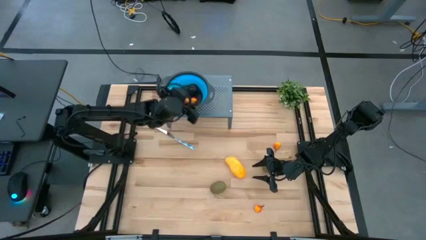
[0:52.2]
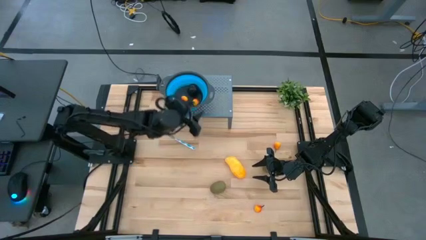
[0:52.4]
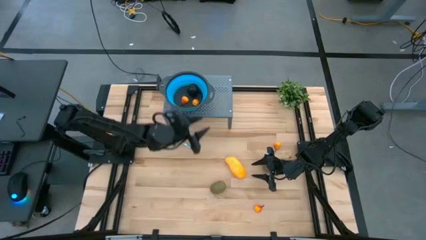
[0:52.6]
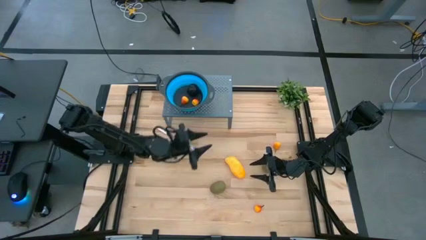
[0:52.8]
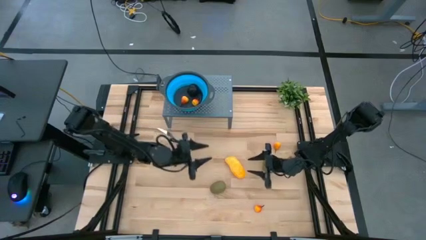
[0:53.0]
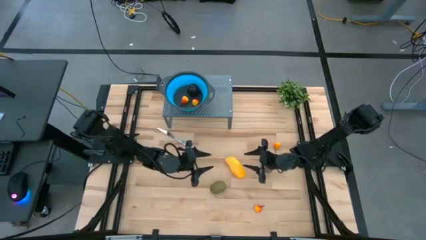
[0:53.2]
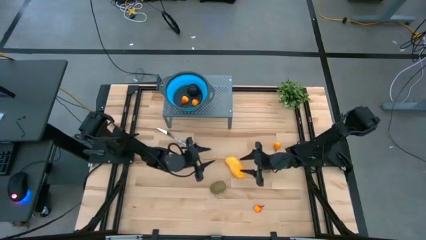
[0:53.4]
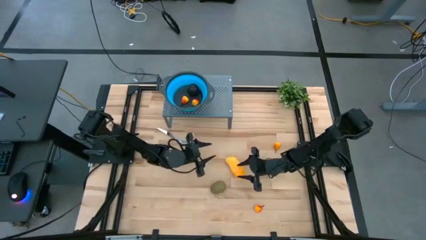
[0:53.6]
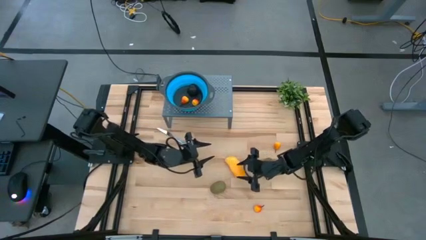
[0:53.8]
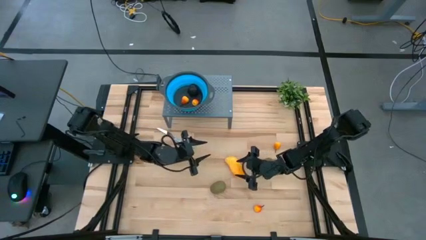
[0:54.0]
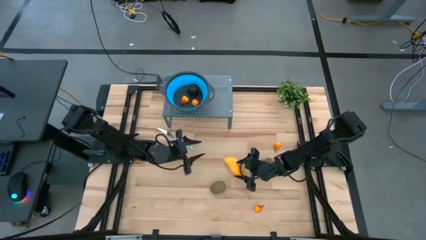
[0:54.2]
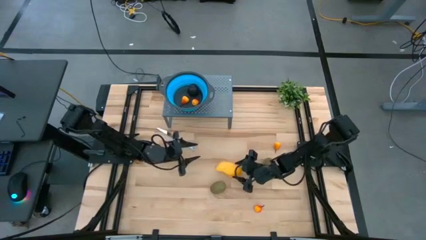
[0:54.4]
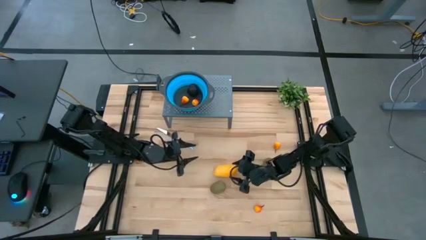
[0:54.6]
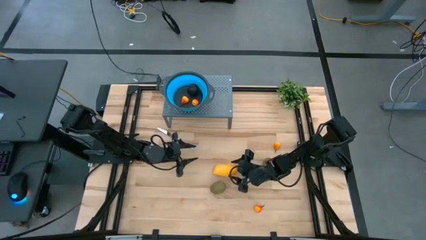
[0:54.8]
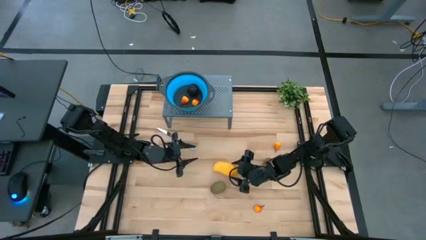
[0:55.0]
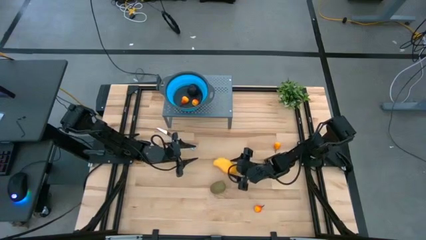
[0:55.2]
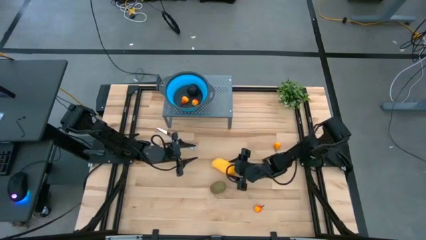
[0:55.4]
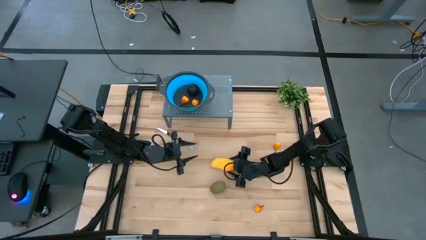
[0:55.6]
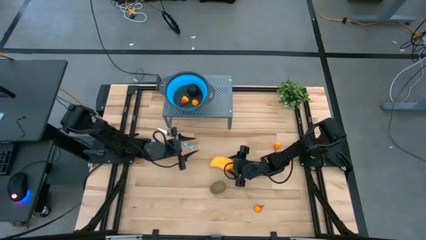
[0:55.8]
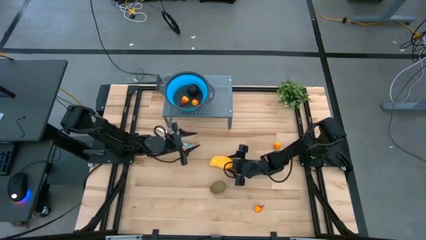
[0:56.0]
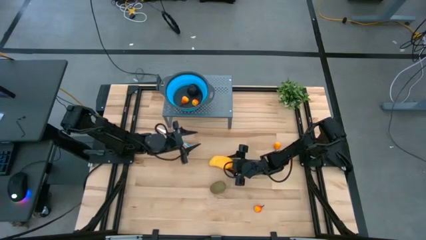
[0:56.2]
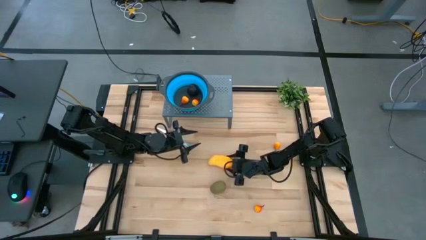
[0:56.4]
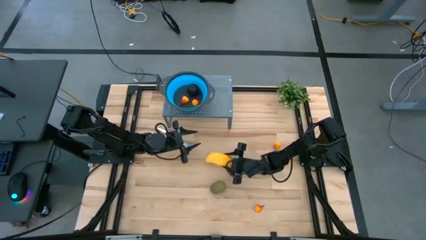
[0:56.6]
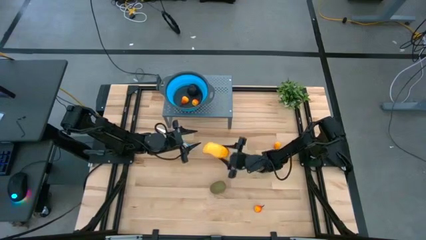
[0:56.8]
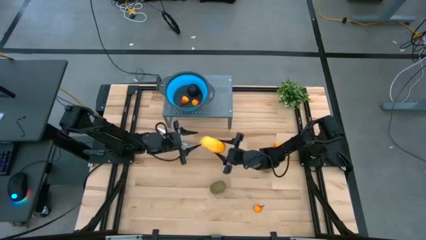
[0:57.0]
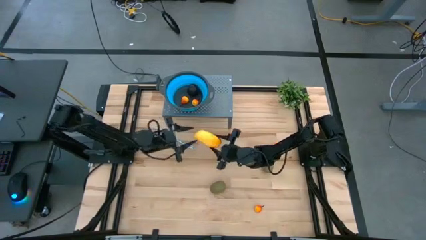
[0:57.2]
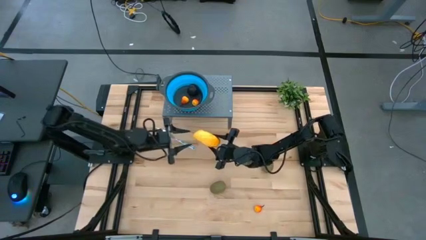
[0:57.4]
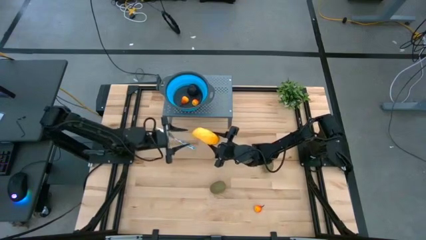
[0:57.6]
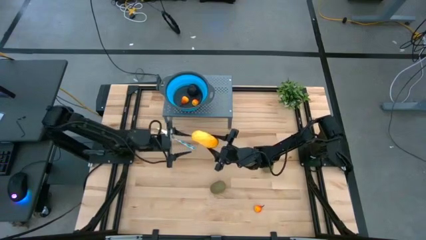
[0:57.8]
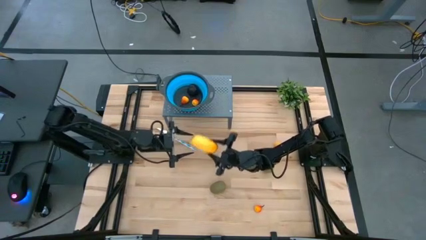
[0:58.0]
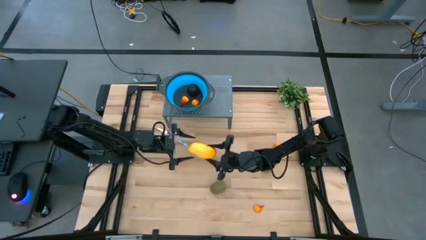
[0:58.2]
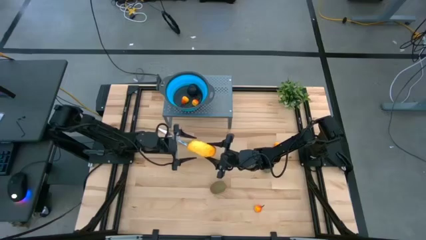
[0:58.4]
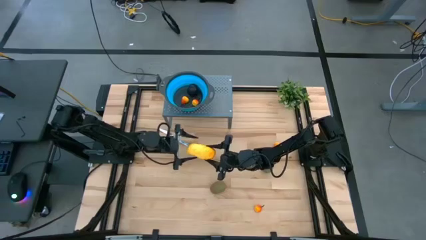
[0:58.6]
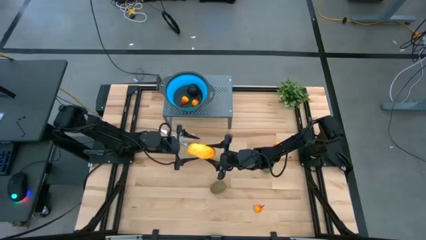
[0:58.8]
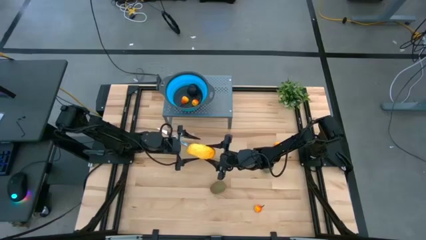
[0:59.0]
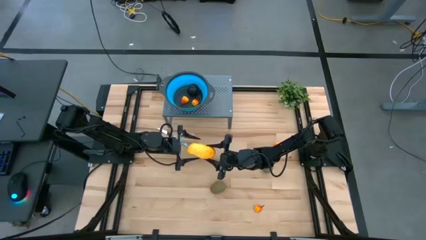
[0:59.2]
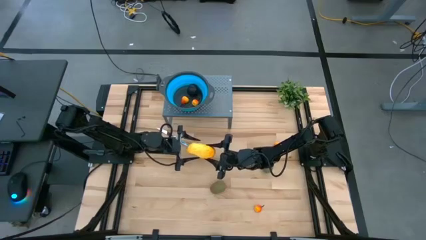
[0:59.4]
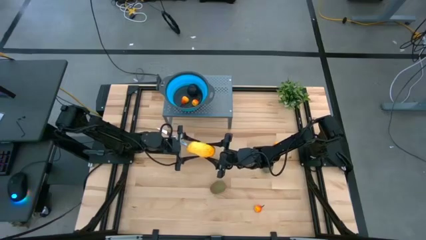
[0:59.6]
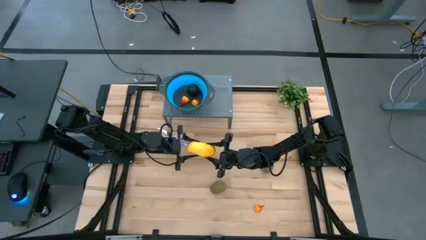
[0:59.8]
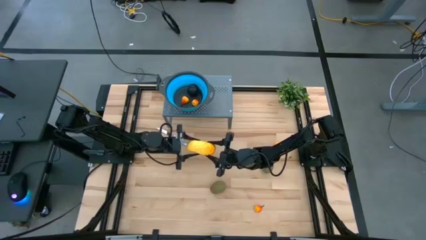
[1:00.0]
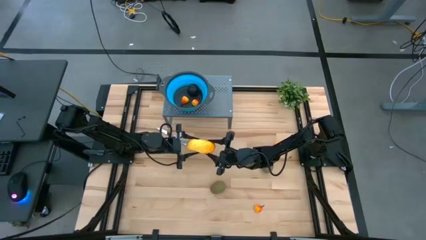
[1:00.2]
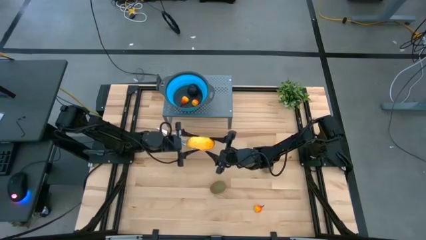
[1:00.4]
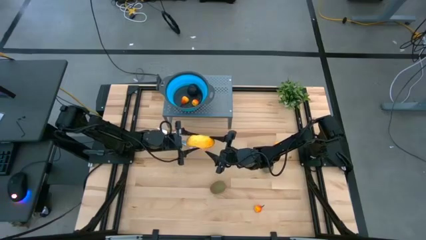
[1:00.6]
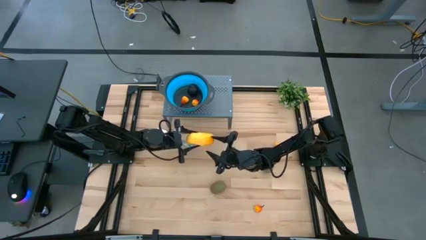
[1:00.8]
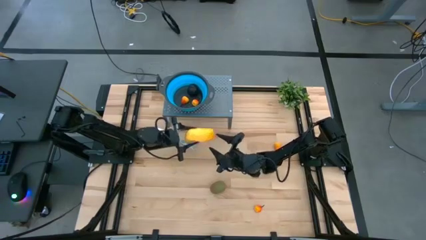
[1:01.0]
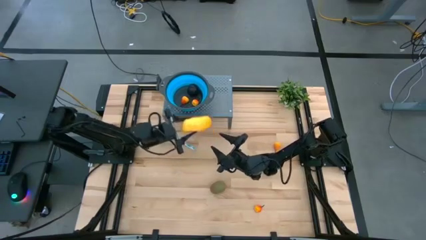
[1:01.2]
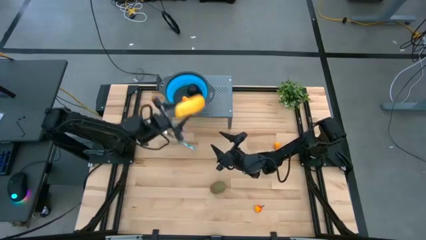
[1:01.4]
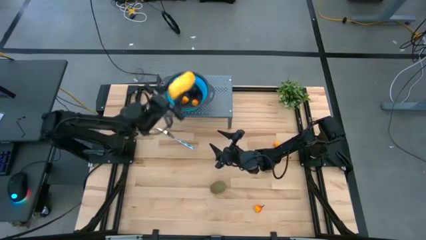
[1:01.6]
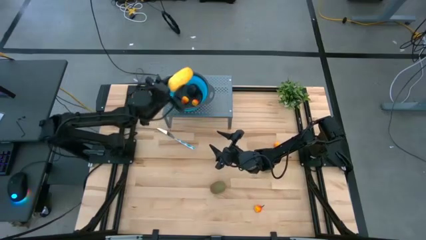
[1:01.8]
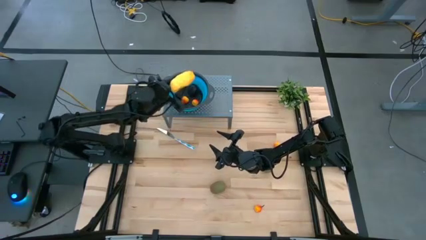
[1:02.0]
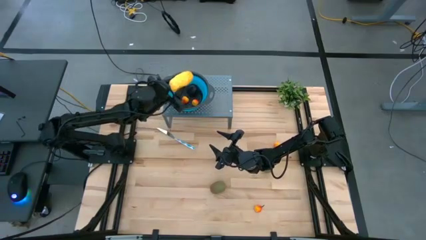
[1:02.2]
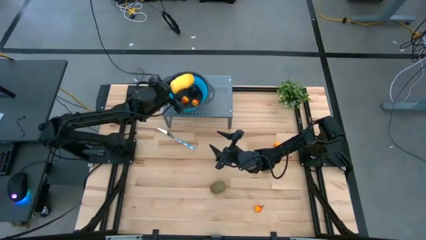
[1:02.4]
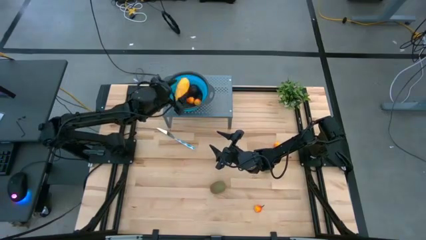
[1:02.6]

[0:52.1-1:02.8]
Task: Pick & Place Fruit
Put the mango into the blue strainer bowl

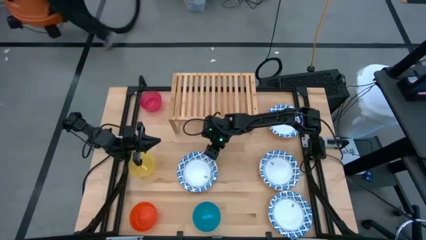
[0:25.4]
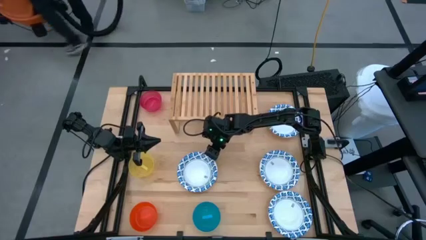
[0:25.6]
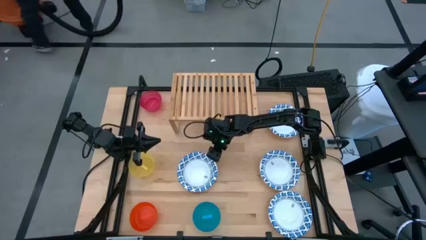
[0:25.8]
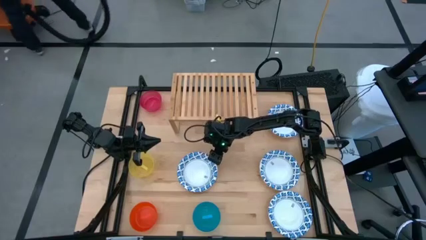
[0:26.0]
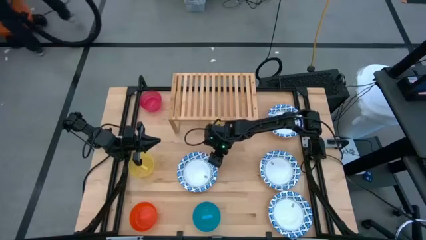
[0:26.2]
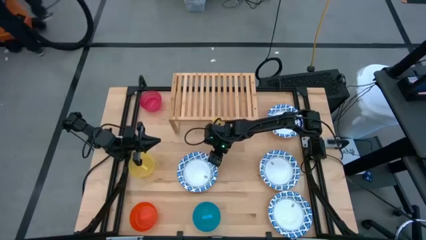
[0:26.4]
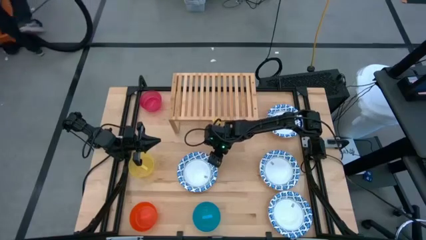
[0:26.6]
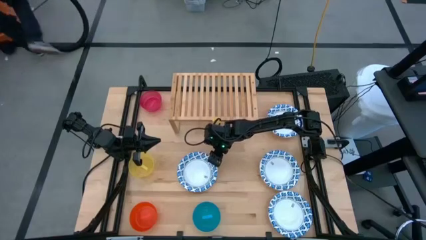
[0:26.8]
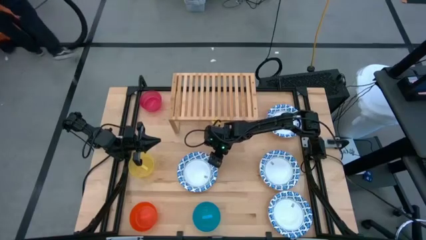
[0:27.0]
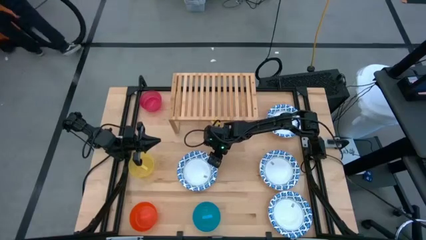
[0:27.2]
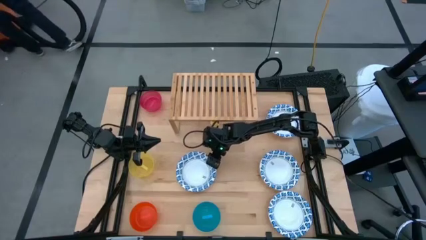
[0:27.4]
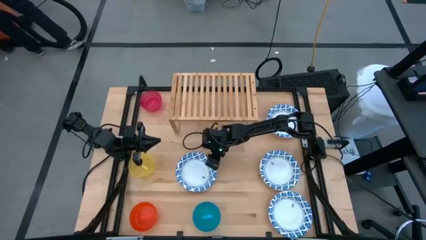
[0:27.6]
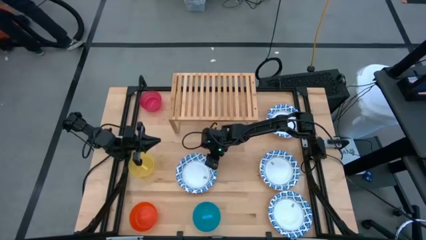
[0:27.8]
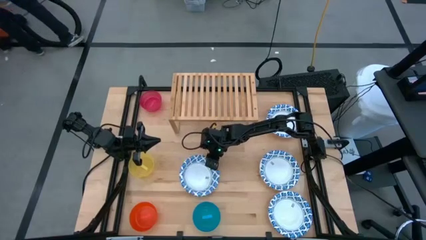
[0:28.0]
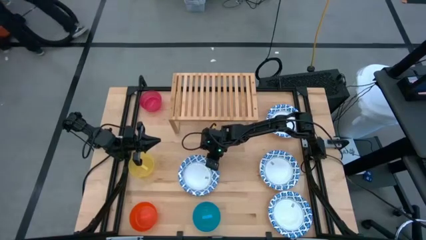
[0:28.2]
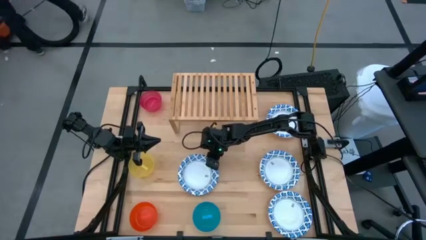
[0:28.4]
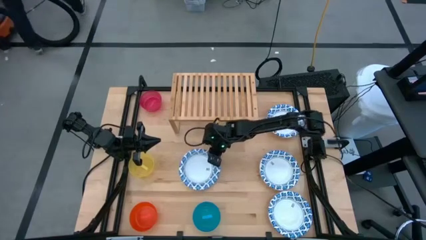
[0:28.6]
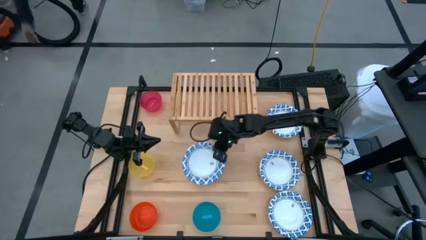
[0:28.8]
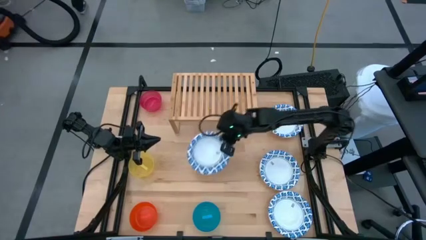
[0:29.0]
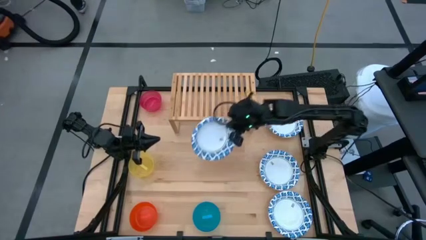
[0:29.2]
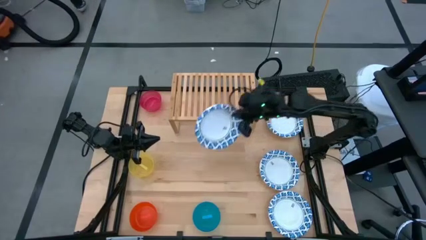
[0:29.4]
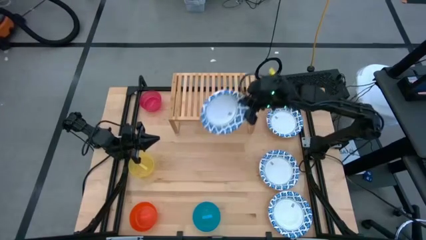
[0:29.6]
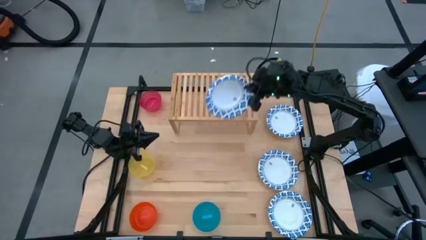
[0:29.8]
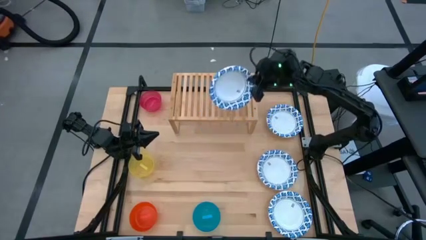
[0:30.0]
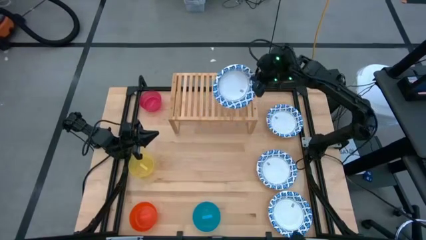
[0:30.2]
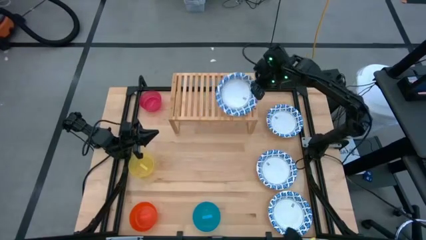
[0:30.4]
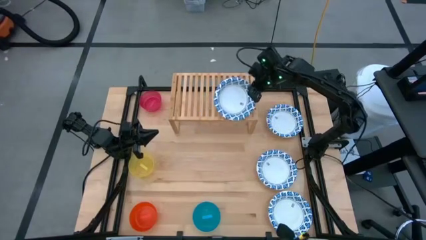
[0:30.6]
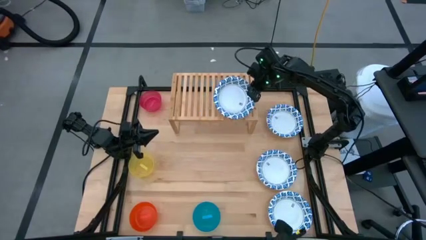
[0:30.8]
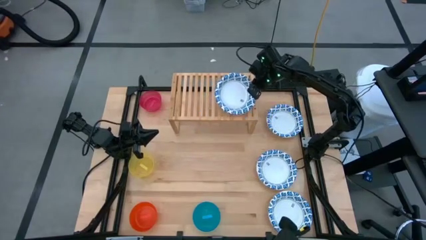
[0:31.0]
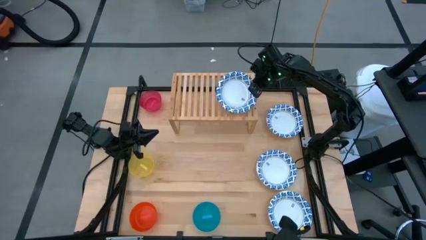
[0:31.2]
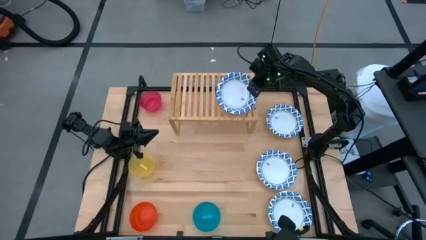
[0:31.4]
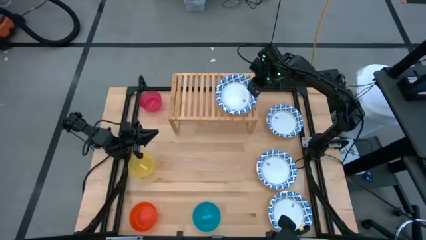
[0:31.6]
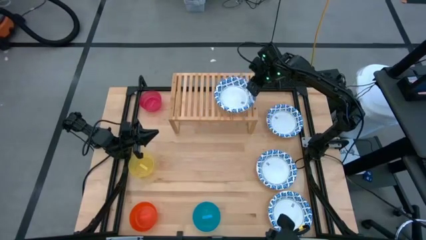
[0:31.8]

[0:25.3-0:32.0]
Task: Place and stack bowls onto a shelf
Put the white bowl on the shelf
